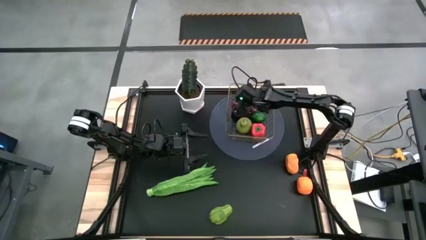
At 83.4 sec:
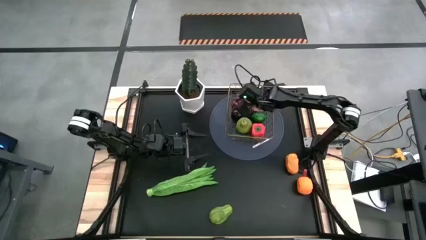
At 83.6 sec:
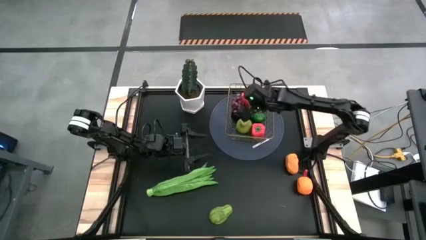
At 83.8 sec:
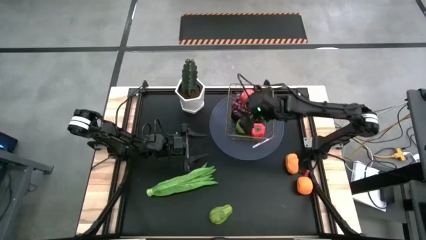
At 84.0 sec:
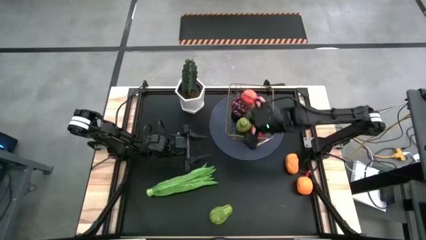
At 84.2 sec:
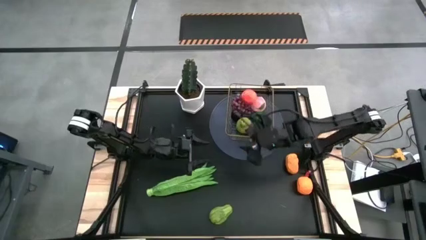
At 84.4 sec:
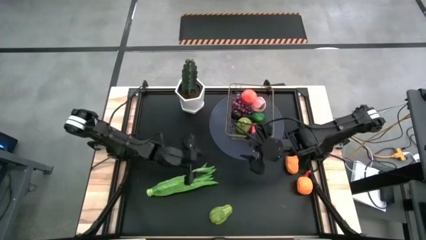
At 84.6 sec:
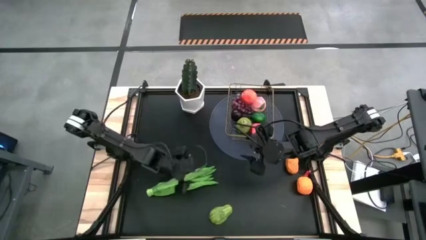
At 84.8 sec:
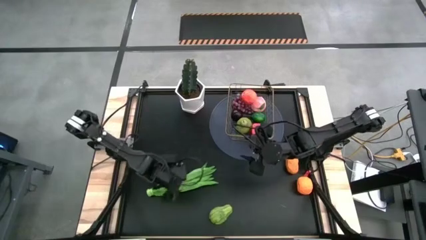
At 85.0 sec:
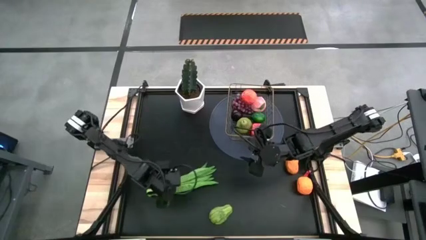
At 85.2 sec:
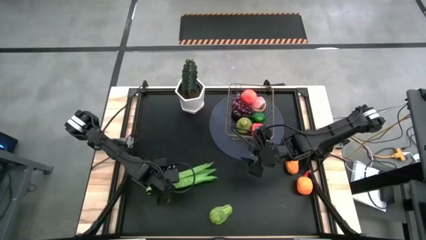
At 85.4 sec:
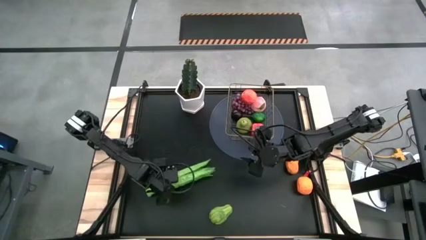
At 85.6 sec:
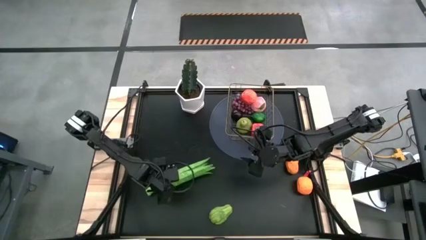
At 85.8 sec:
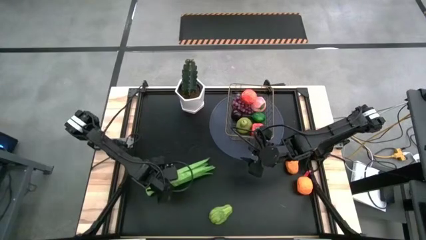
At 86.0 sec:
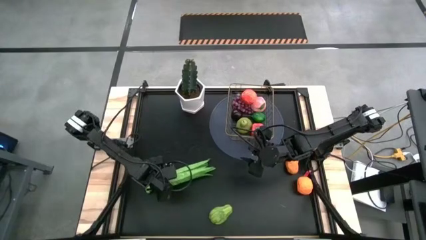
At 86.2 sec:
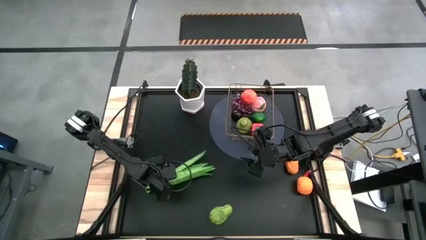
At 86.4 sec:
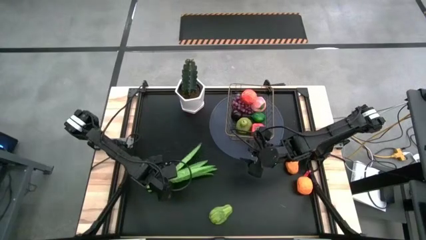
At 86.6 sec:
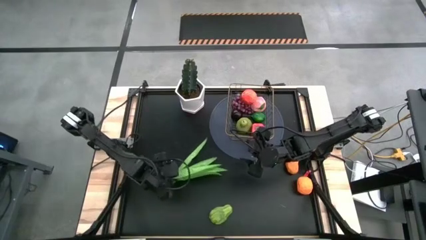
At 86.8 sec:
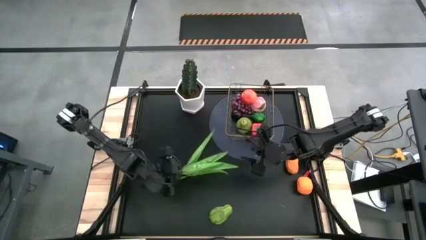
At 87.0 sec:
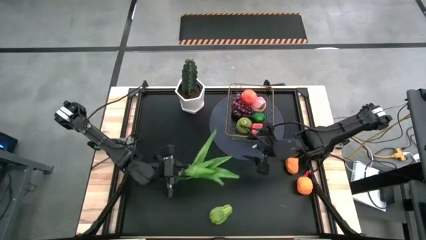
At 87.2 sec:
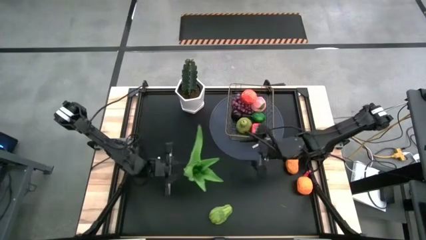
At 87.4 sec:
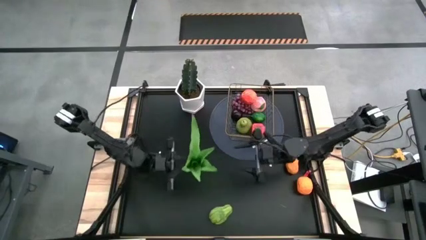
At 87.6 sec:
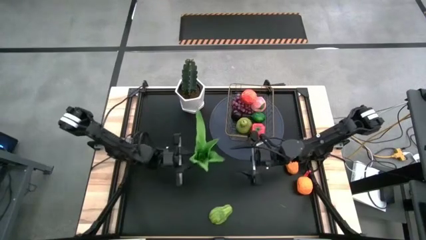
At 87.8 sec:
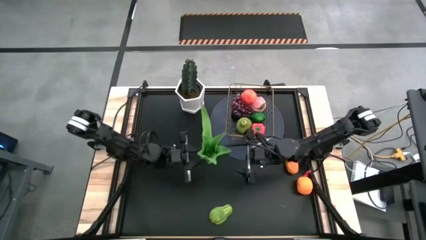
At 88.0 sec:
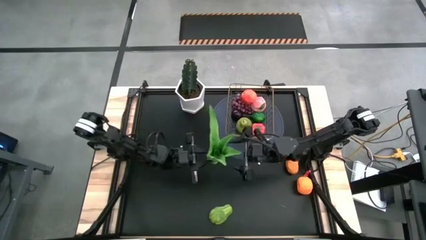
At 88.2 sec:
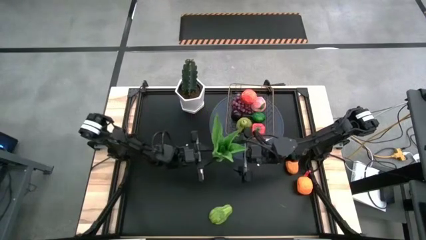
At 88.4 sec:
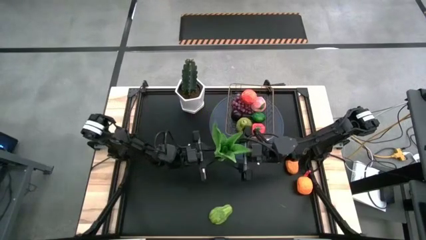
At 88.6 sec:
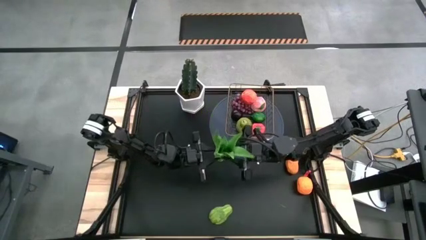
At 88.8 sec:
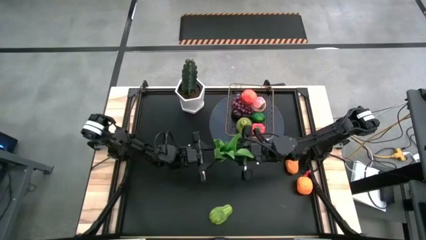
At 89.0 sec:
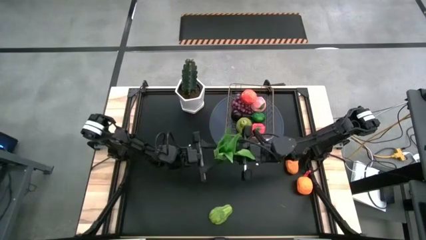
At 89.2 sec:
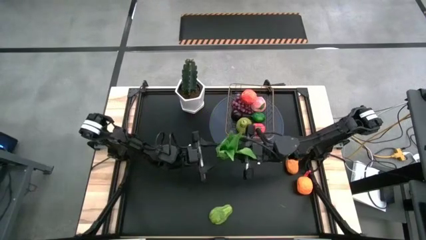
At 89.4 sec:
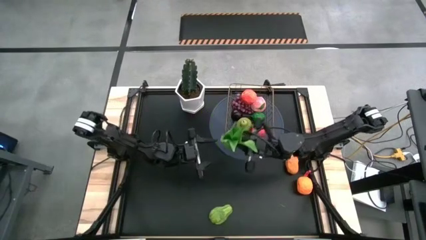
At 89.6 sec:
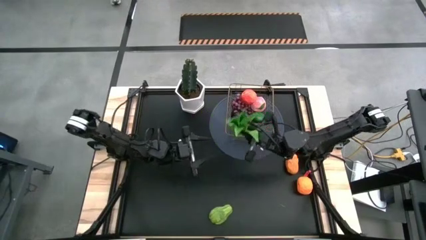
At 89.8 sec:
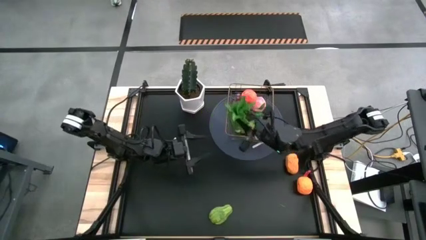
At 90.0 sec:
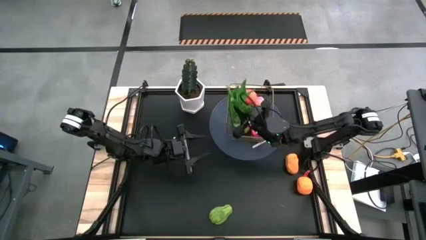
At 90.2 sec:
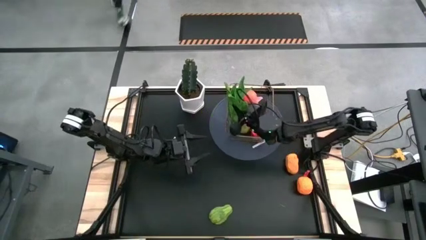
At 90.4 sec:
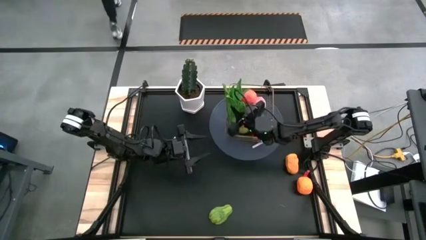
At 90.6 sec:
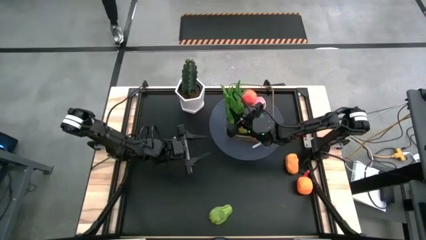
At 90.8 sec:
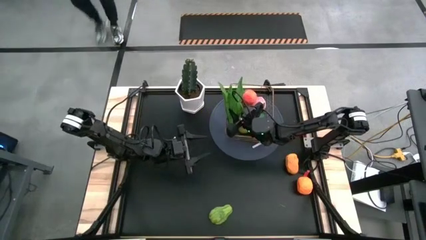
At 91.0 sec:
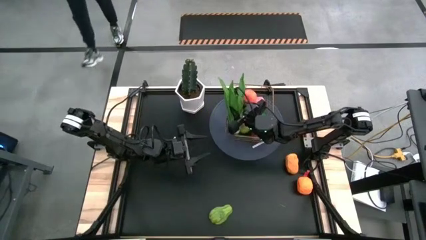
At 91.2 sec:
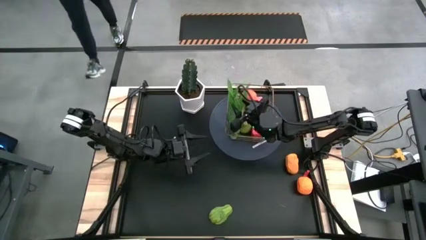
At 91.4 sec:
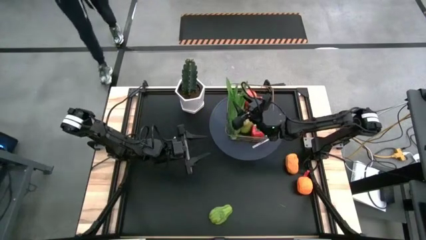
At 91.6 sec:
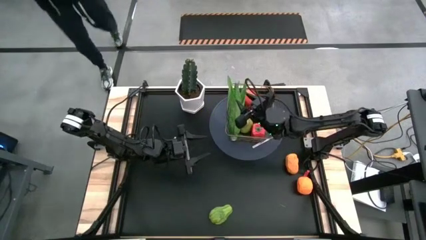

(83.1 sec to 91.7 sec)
Task: Build produce basket
Put the green leaf lettuce into the gold wire basket

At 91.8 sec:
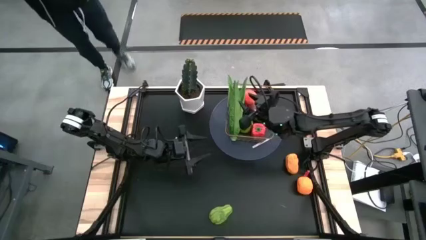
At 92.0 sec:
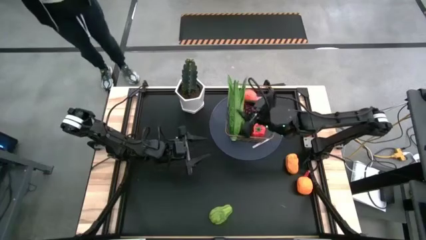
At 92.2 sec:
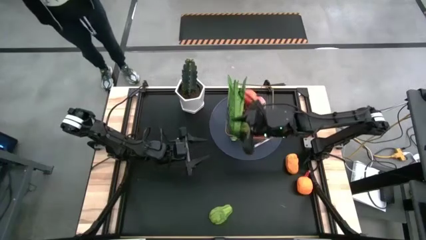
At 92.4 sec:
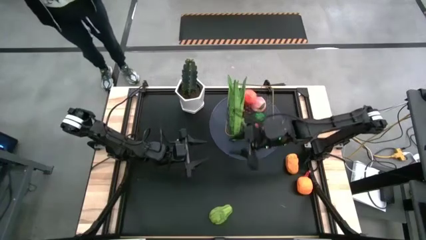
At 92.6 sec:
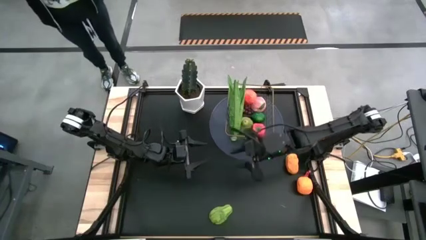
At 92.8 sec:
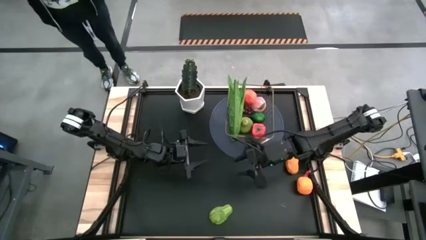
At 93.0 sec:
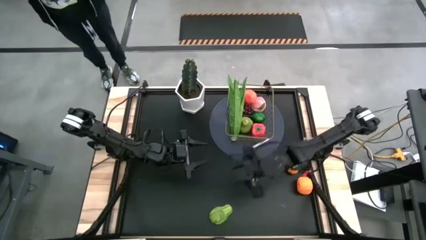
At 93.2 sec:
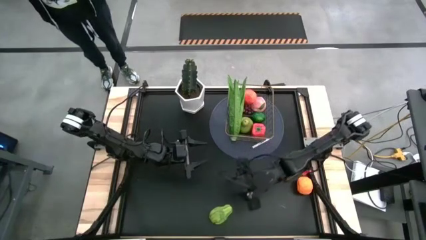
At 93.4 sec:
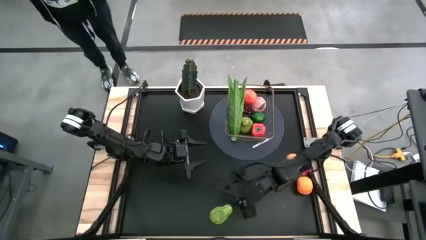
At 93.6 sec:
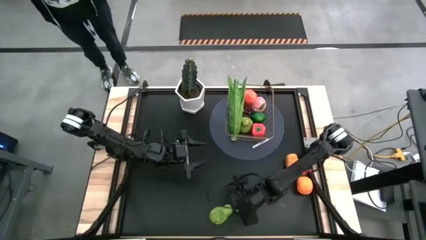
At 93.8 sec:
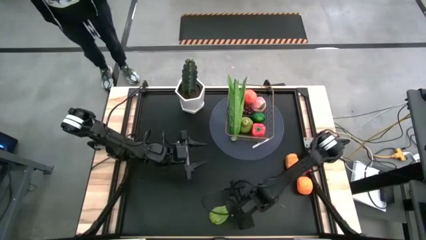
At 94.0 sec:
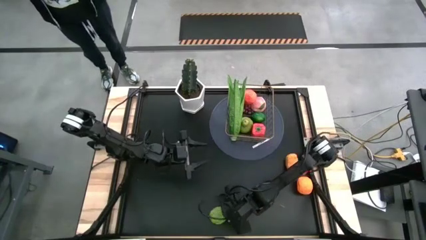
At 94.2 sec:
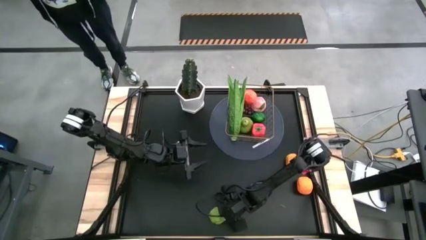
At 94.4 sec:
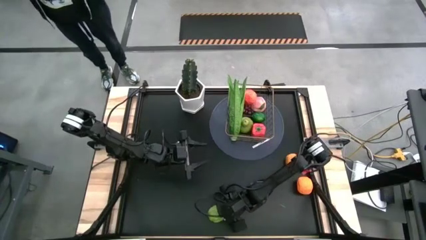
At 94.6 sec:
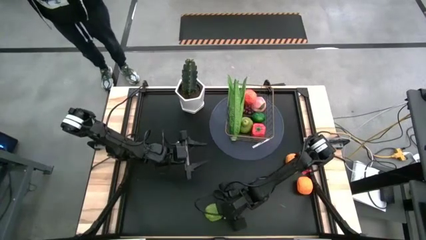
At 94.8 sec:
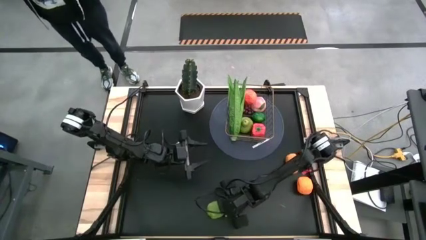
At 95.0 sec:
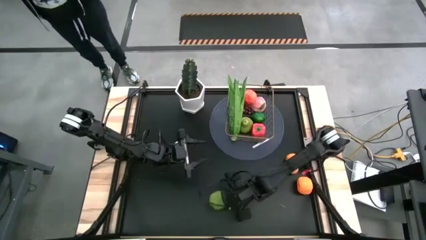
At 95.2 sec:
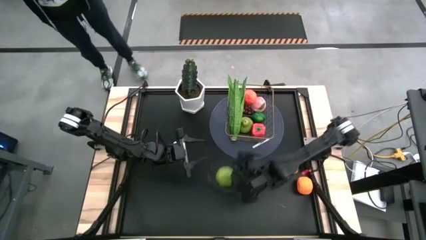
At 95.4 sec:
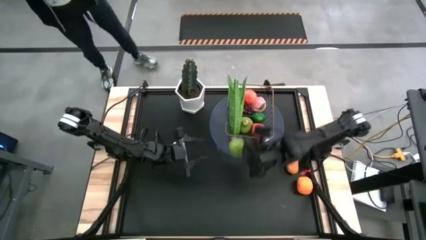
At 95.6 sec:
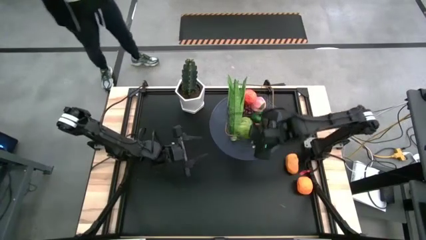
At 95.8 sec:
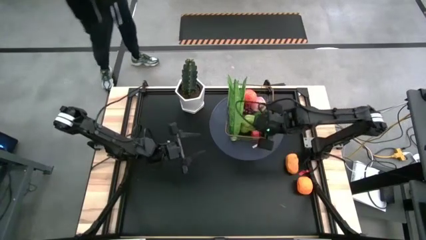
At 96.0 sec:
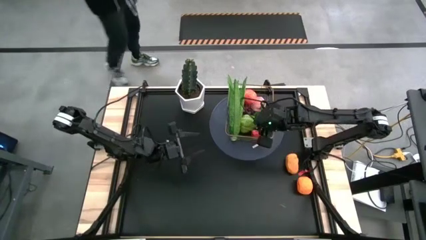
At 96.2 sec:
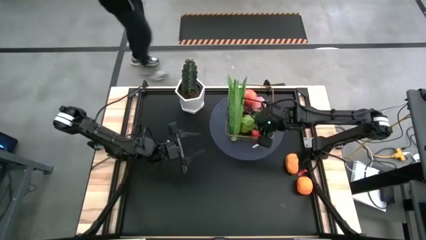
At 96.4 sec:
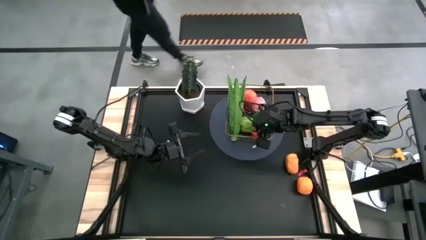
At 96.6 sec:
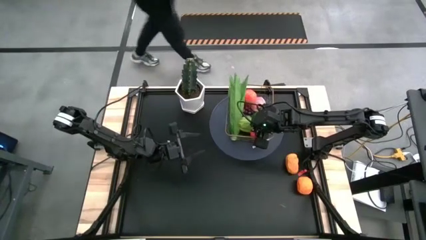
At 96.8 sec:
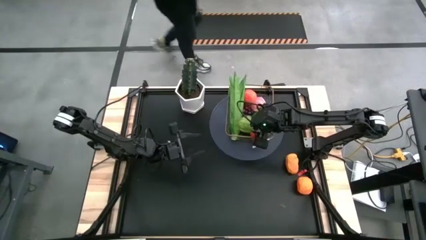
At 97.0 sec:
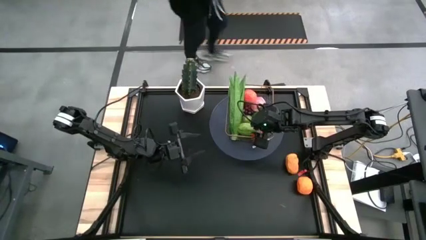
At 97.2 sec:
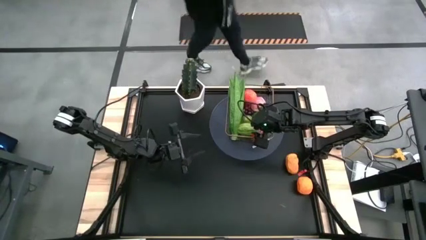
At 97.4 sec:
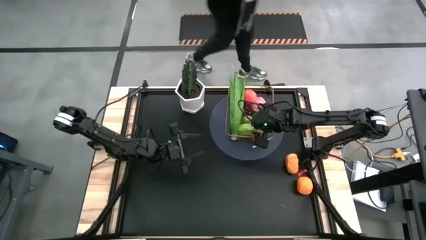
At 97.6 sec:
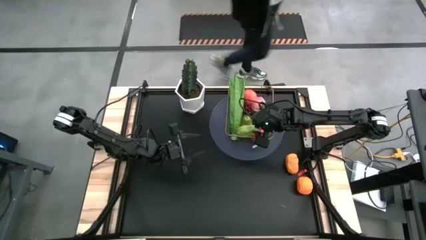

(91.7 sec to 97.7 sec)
Put the green chayote into the gold wire basket

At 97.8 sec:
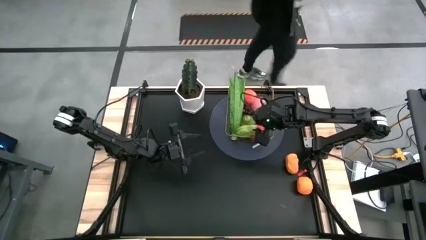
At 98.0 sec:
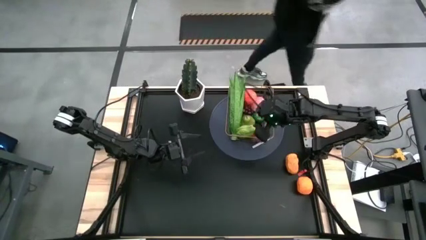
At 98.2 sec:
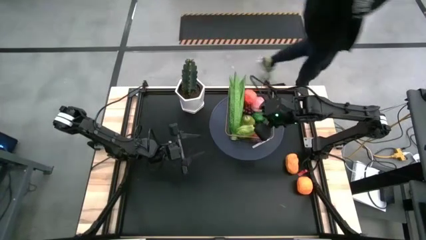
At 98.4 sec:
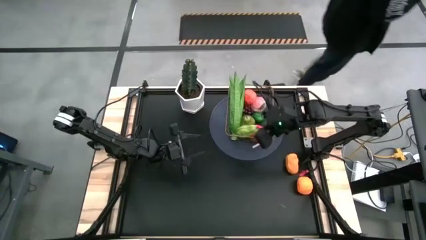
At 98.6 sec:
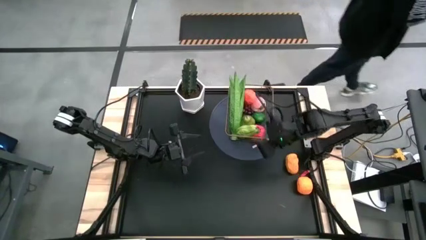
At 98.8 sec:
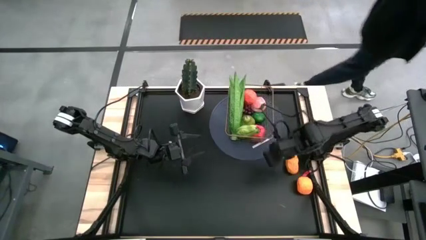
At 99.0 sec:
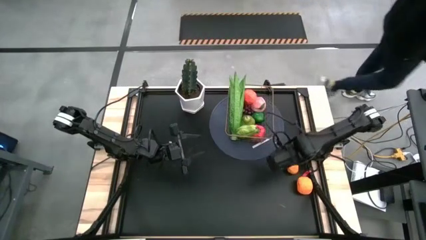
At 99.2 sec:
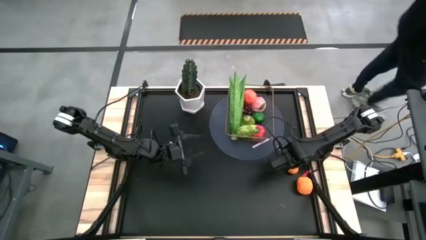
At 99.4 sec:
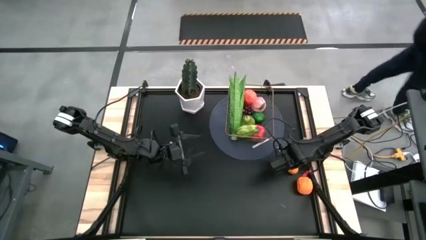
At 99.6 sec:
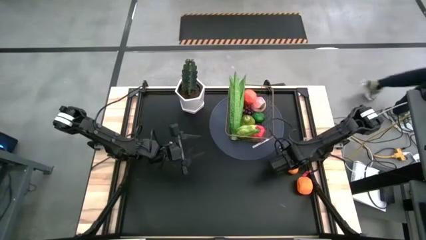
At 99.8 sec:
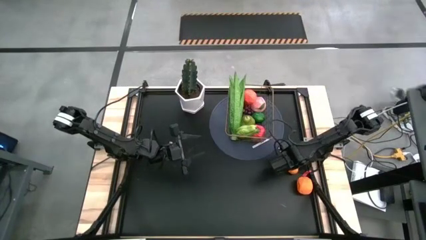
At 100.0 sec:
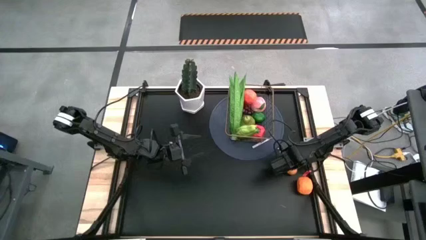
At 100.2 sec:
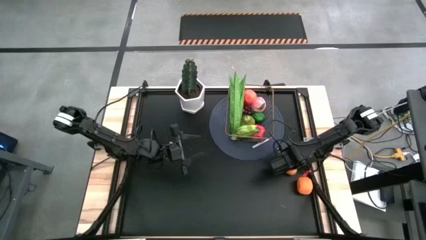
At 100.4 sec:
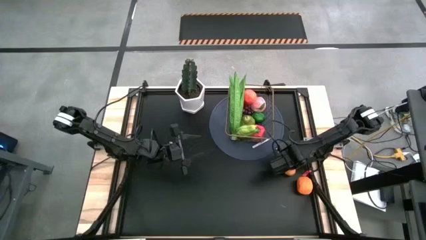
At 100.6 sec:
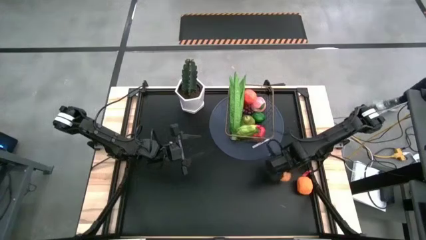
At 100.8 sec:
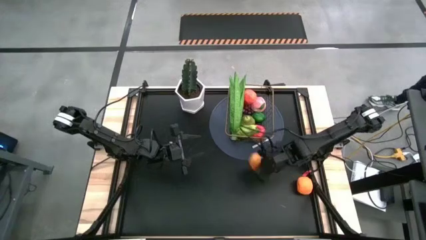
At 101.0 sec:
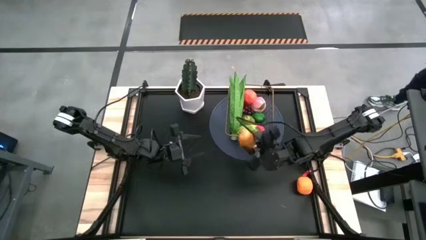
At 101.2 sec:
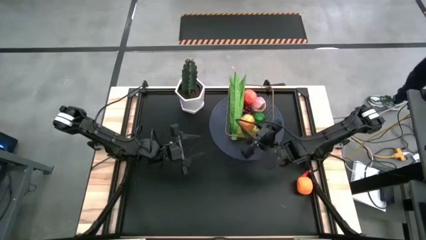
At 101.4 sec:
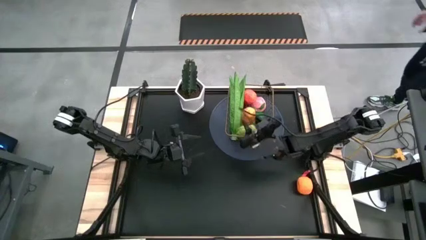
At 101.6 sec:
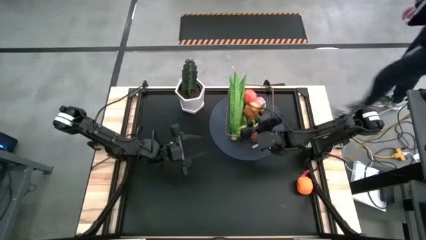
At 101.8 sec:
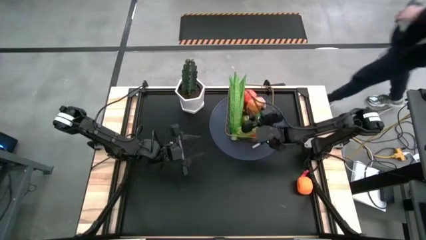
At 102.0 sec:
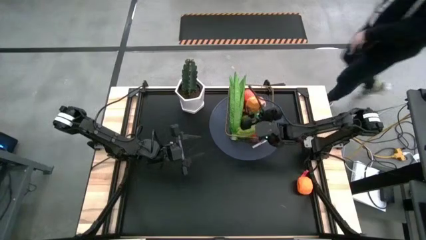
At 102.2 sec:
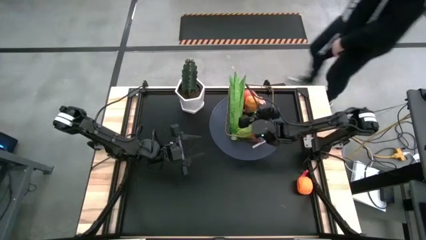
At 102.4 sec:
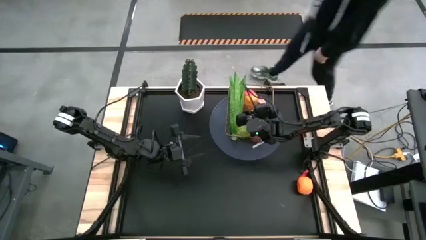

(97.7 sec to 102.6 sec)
Put the yellow mango into the gold wire basket
